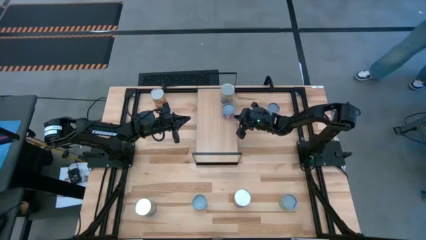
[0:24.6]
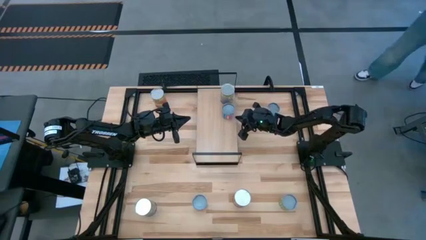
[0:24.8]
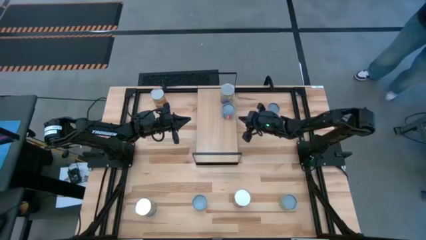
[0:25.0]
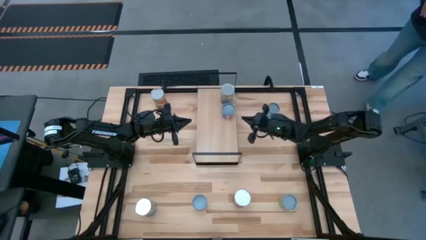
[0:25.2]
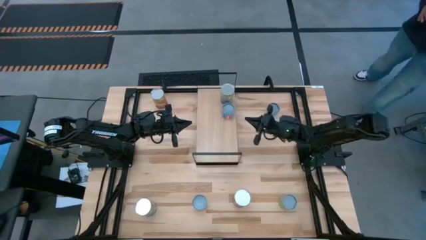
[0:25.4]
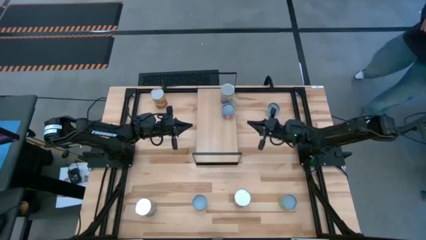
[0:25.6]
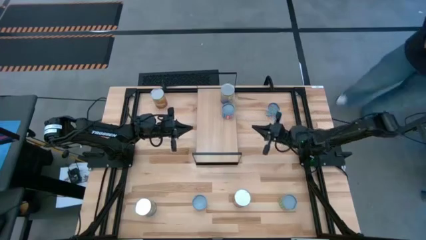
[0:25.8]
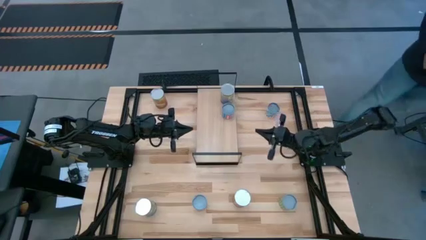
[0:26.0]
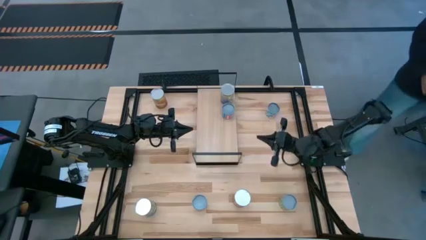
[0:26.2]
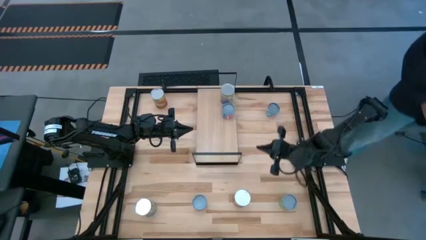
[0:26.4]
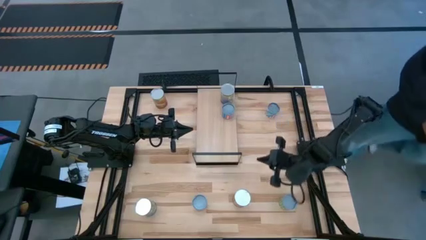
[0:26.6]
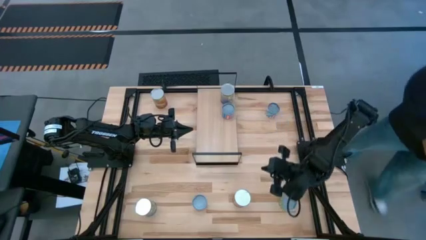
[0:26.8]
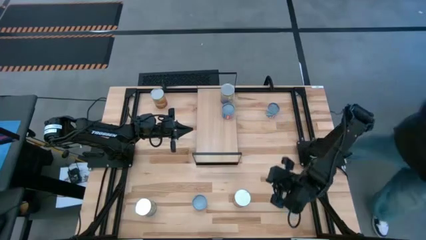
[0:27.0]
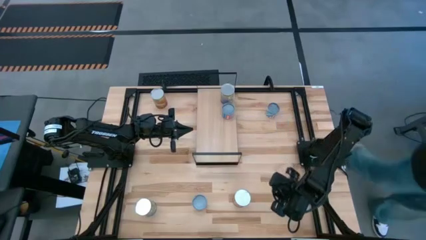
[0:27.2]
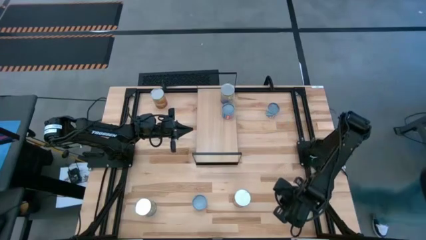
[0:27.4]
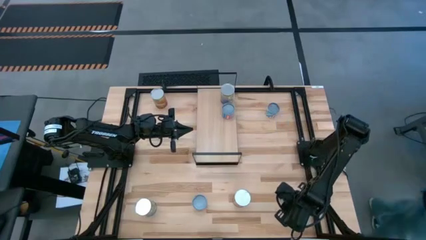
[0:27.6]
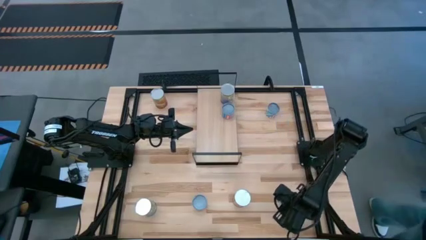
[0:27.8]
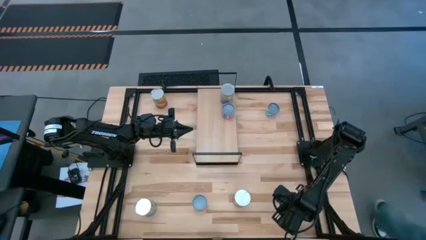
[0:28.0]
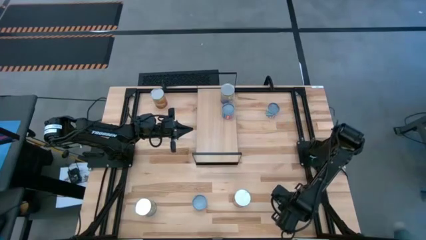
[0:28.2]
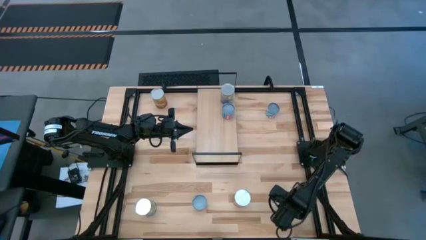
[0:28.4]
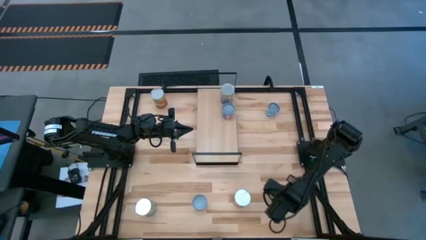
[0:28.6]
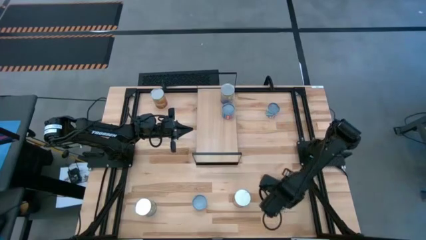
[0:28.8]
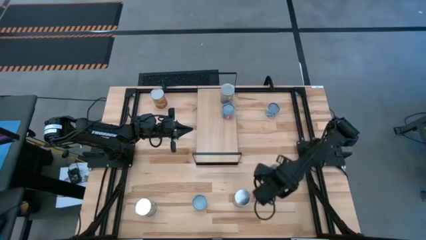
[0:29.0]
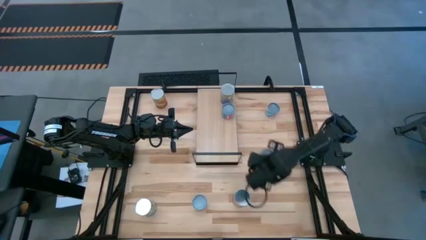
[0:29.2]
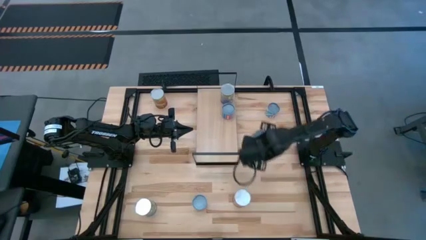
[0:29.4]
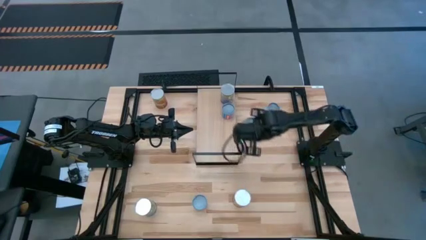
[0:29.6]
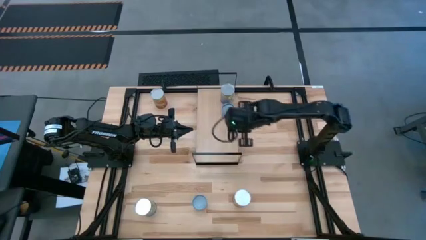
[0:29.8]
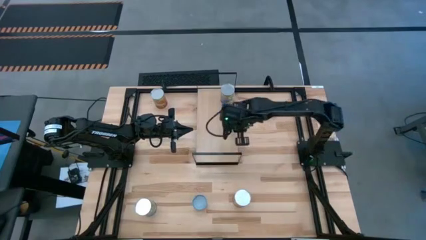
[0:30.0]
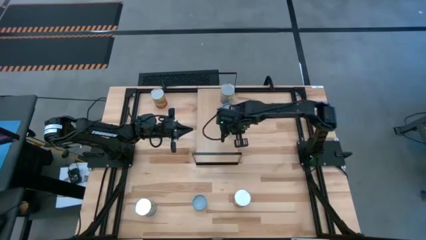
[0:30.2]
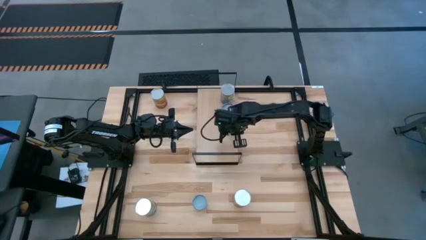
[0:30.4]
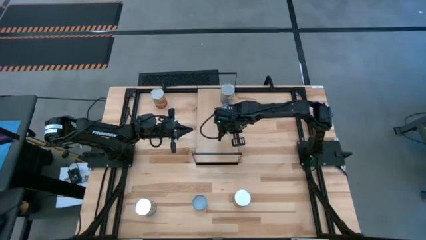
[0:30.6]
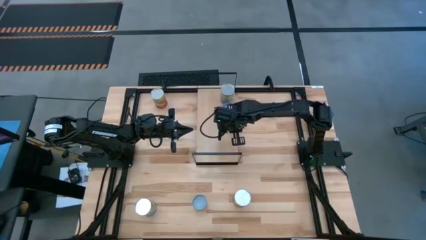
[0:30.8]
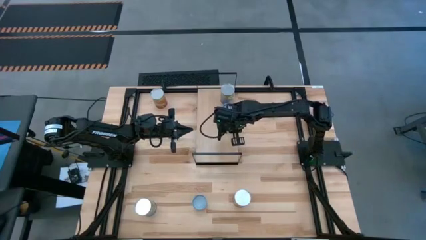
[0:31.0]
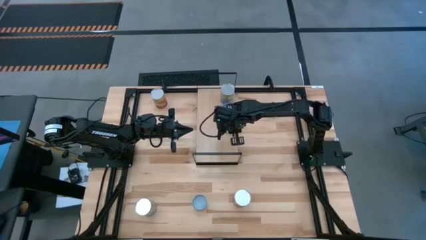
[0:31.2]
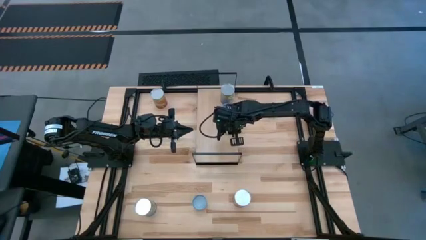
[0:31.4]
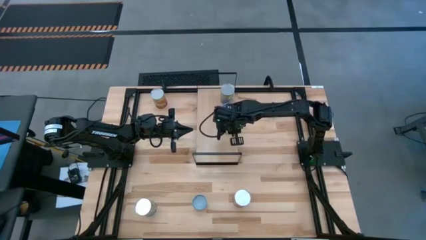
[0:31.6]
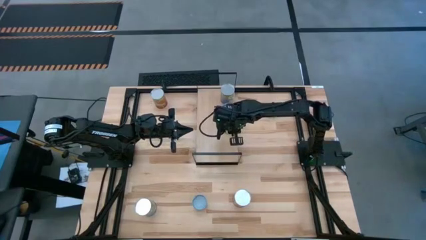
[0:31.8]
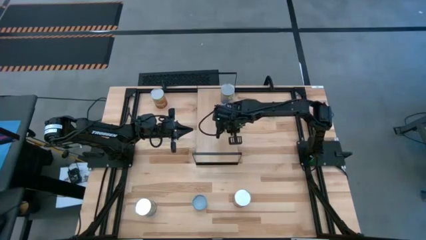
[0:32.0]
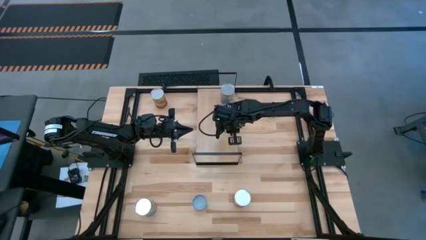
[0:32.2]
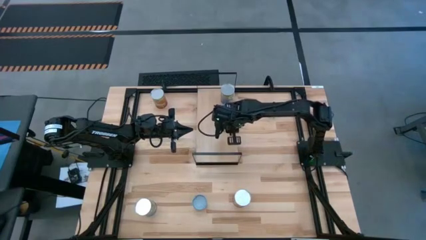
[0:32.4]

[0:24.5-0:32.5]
Task: Pick and place cans onto a shelf
Put the small canned peas on the shelf

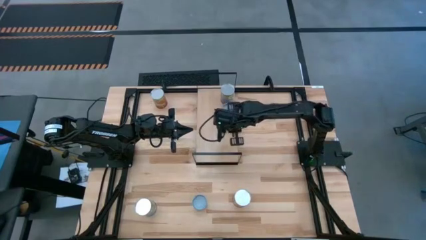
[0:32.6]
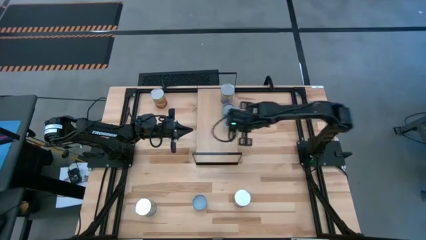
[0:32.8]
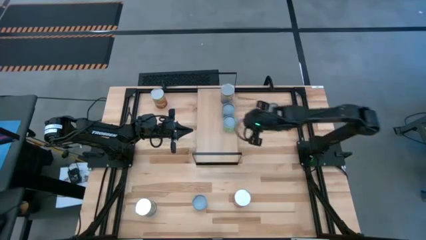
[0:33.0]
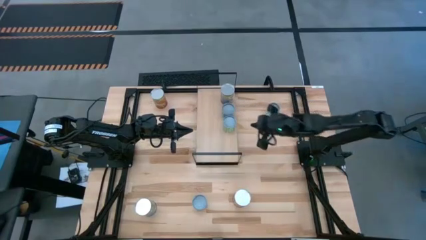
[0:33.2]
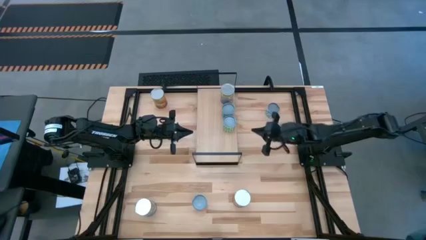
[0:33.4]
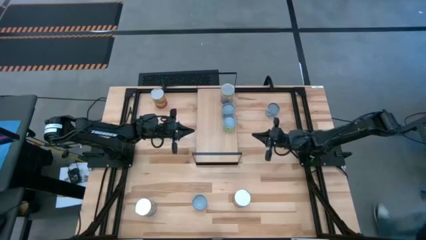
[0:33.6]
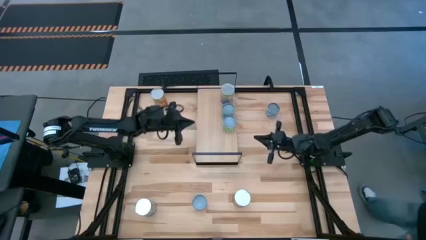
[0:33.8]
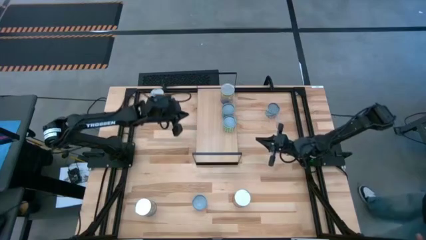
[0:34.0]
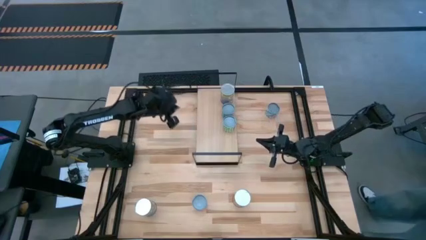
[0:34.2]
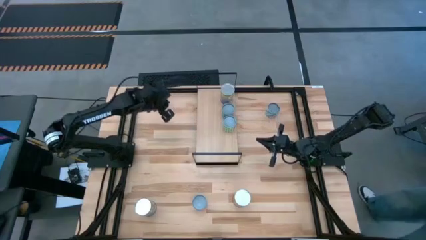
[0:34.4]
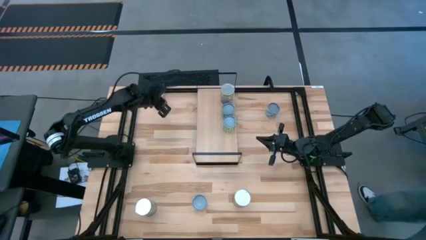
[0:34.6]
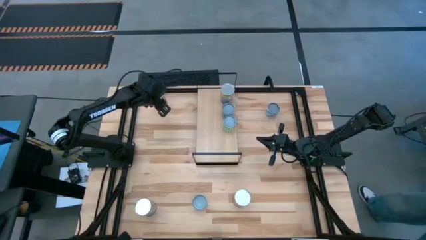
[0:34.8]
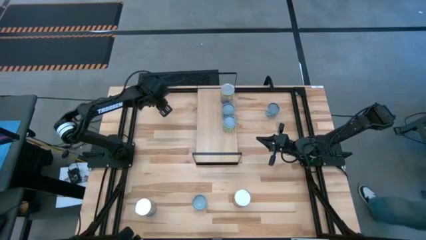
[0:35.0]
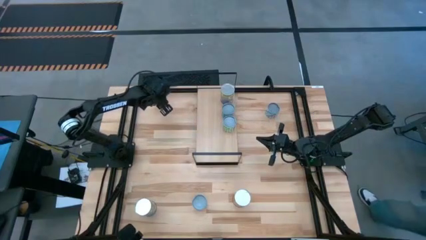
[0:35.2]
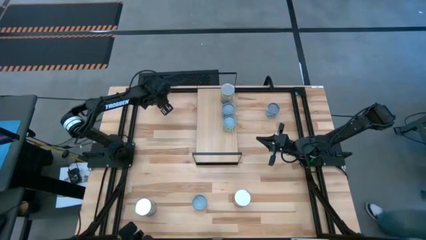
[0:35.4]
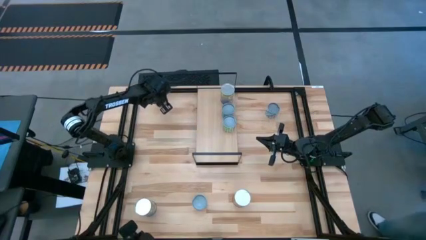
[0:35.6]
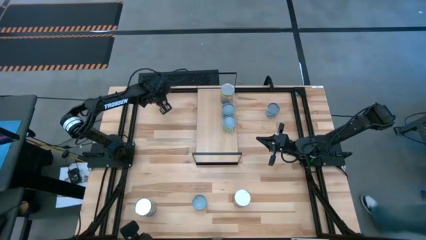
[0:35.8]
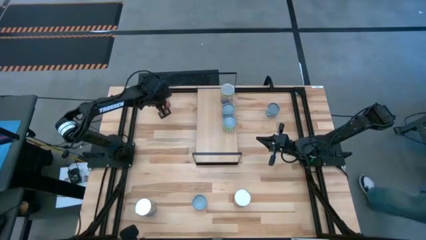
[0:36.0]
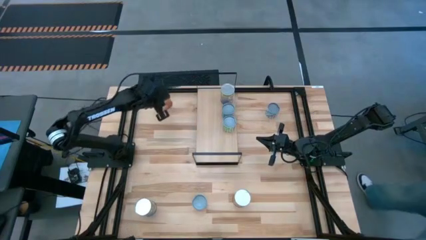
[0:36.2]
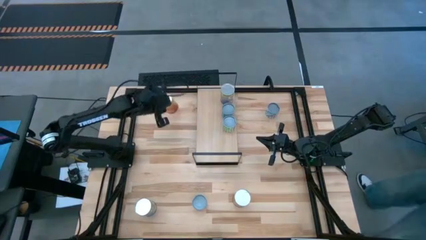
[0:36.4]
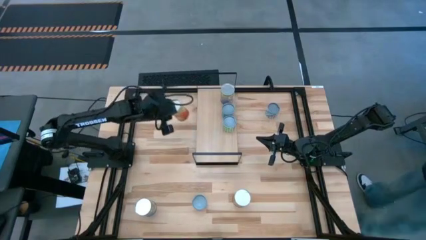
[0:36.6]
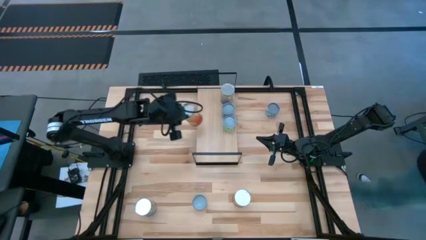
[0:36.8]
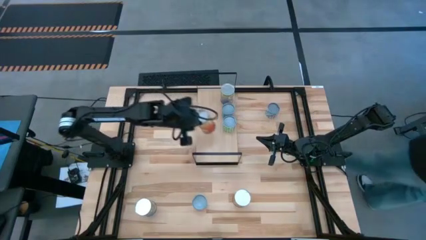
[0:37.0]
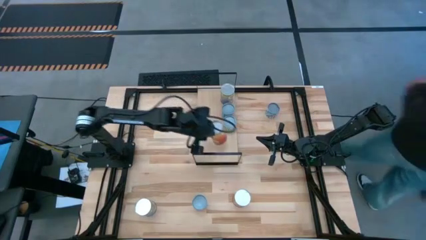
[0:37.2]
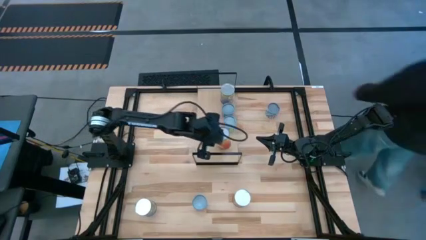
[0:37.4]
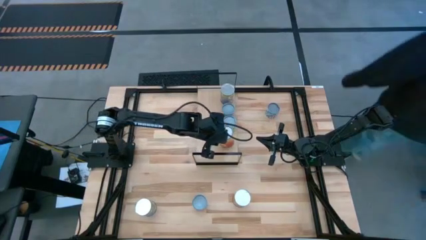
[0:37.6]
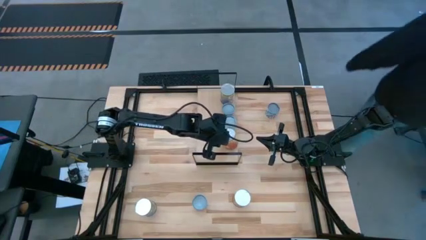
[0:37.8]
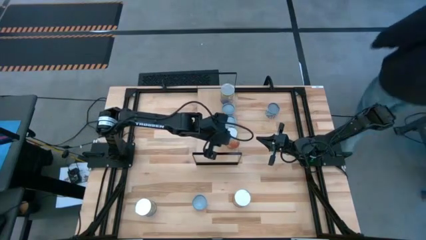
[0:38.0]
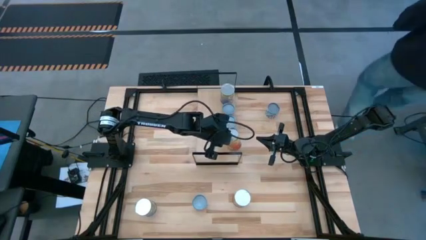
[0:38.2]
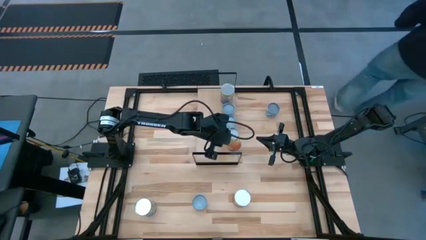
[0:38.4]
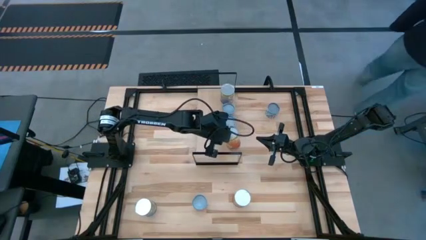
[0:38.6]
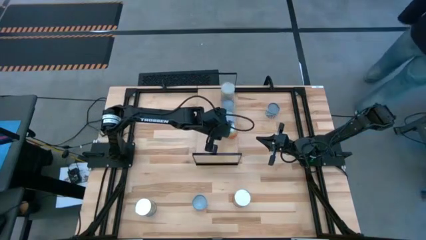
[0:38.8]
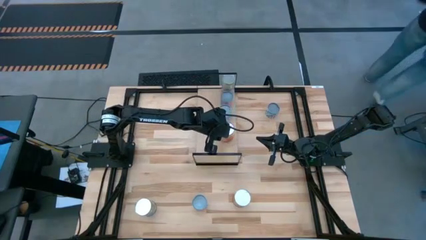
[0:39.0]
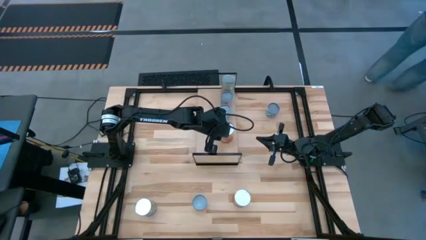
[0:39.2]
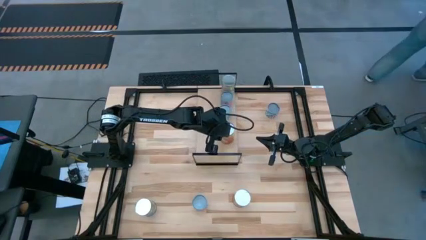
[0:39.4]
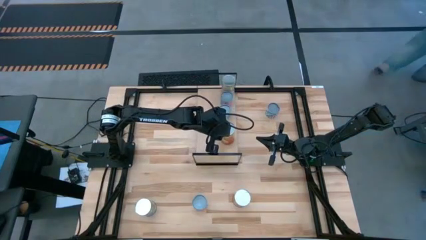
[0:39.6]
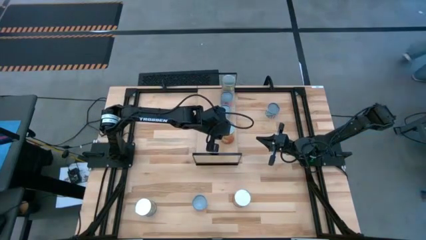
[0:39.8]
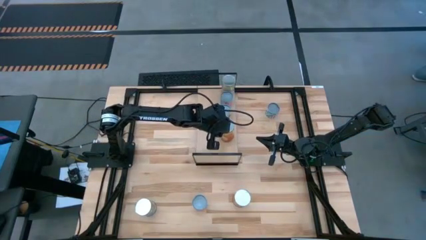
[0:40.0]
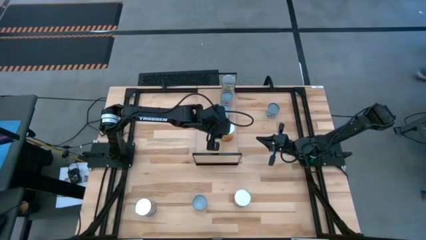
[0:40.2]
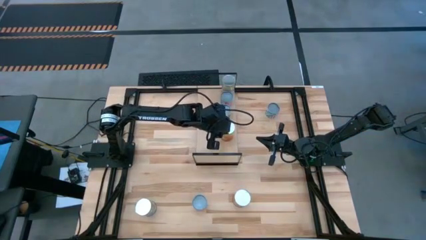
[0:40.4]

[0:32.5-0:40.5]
Put the top large canned corn on the shelf
